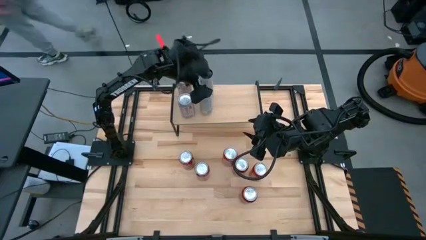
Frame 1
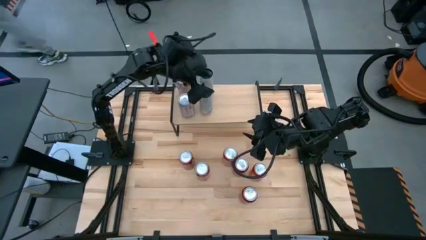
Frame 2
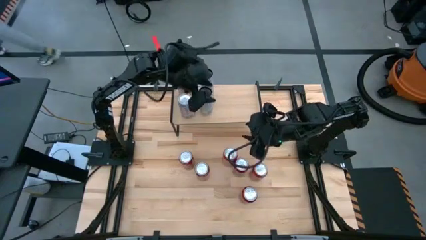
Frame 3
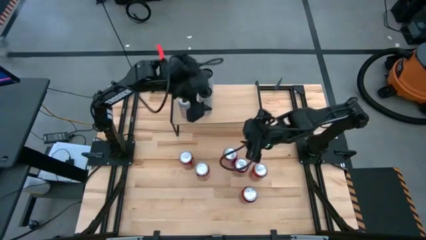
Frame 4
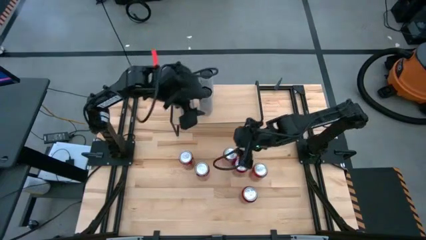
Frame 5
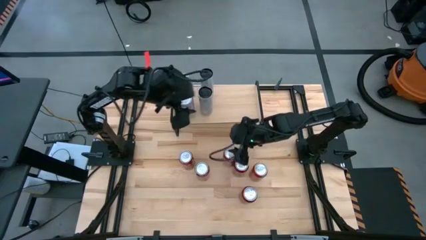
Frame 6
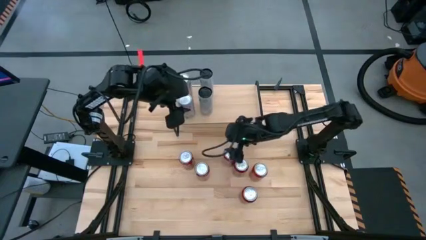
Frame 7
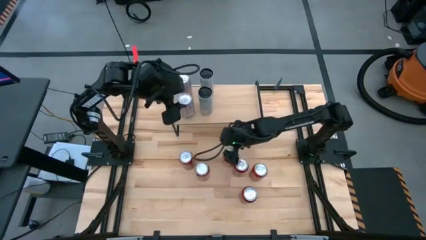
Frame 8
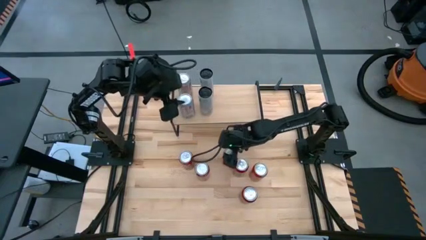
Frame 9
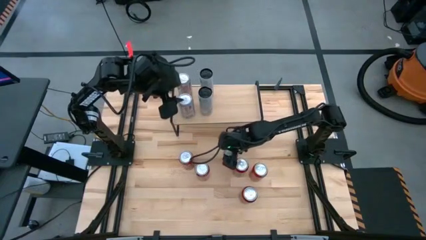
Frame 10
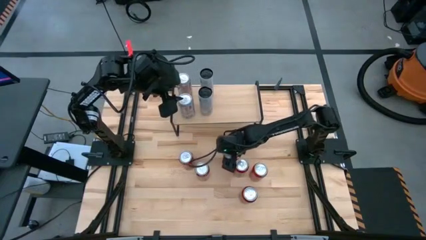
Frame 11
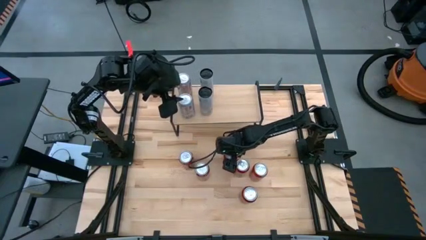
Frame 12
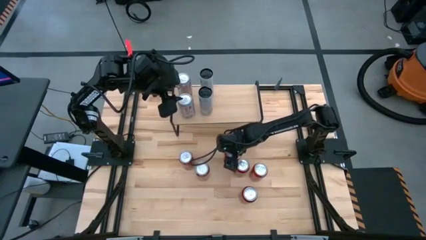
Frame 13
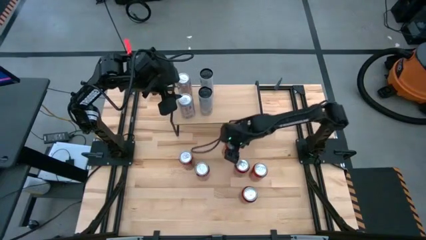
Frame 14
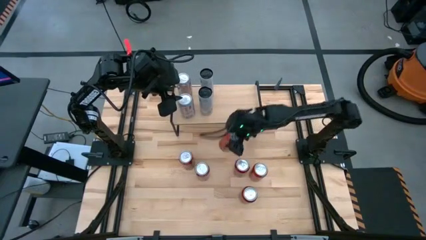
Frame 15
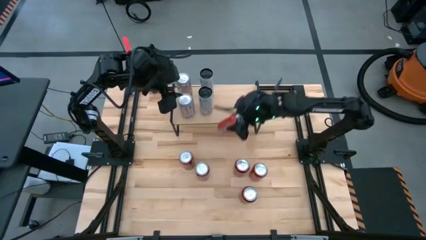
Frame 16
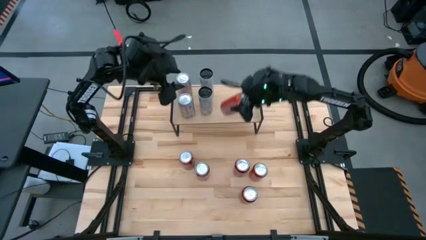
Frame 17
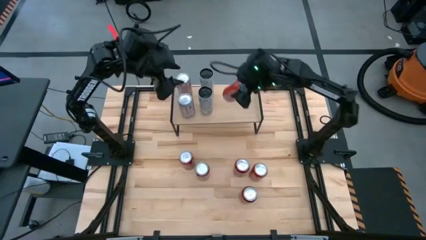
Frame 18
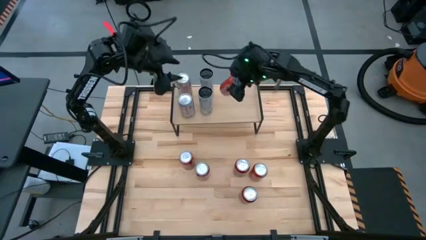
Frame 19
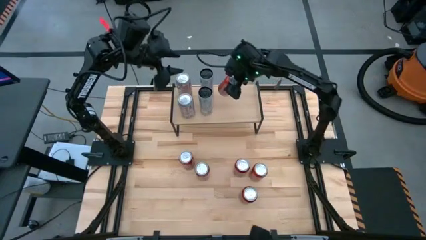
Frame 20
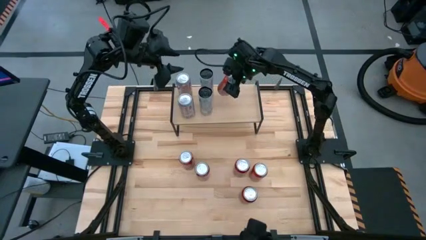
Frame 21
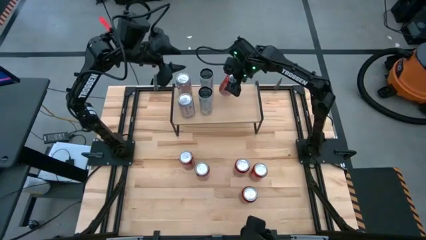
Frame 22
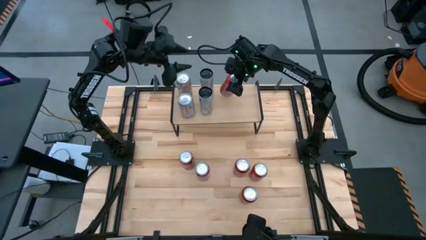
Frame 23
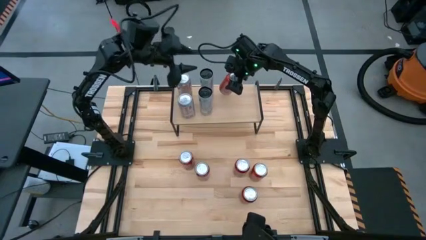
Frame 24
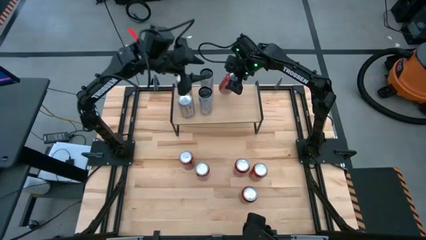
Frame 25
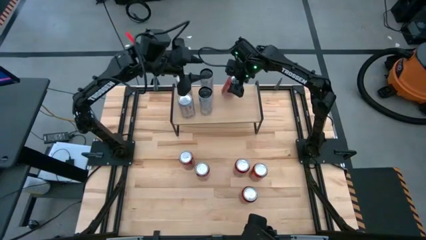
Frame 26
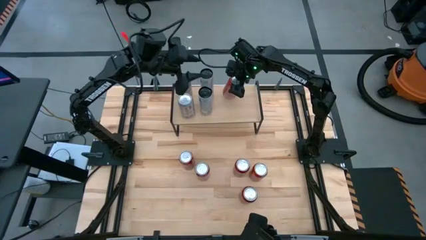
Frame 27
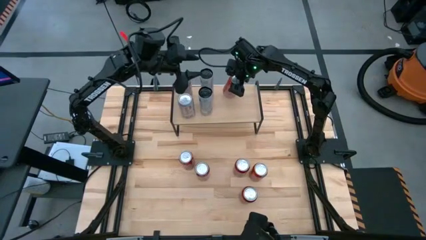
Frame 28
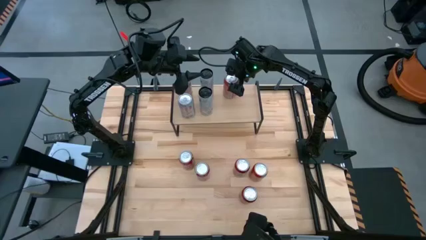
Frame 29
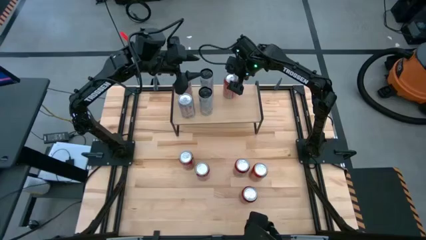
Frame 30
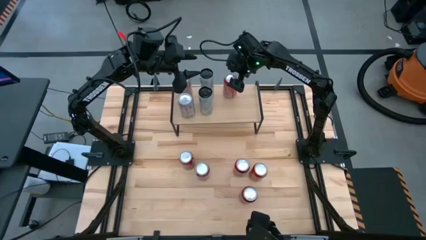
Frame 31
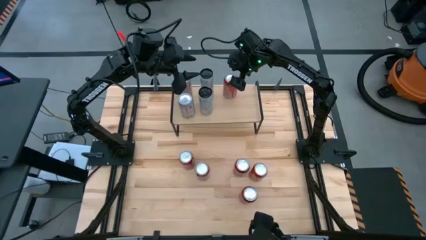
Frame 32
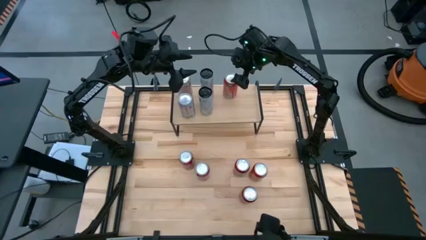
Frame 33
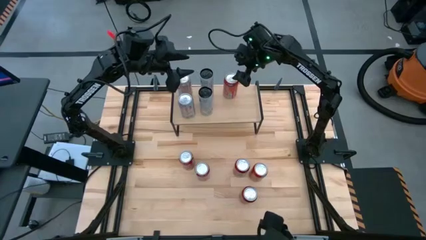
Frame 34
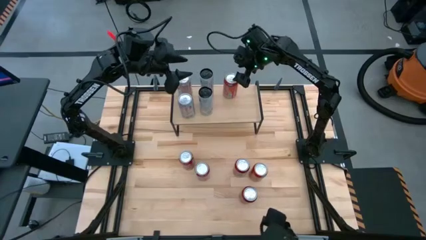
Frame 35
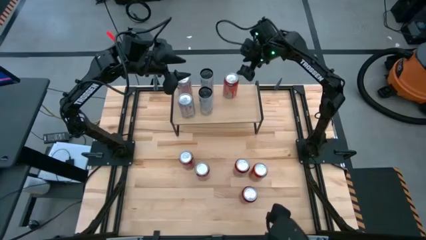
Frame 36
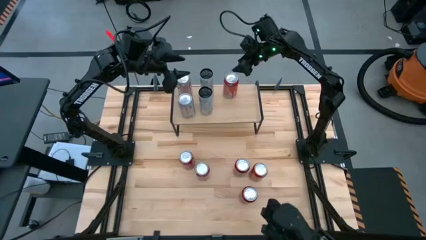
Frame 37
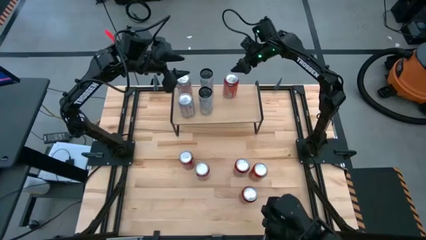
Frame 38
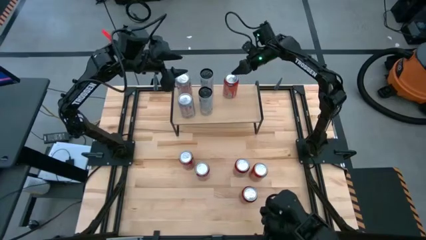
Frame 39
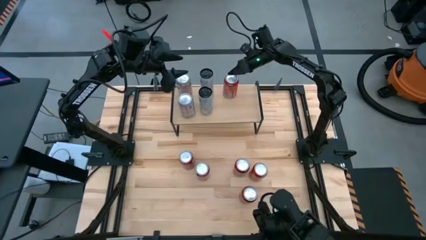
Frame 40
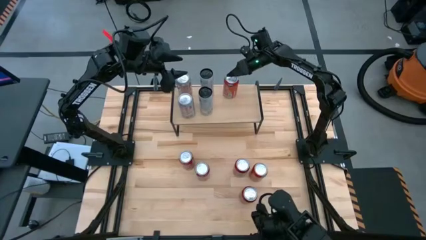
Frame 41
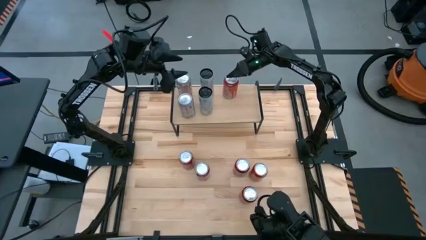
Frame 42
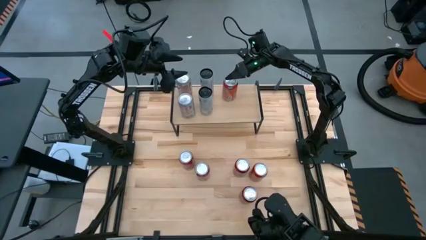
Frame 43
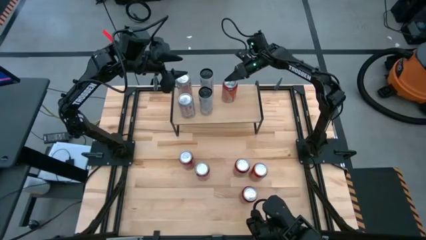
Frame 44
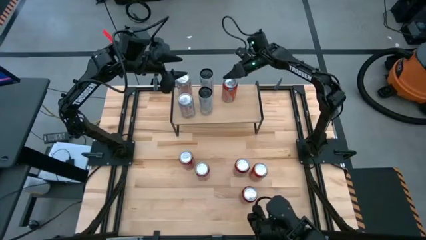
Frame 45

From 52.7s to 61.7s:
Task: Place canned beverage on shelf
Put the top red soda can on the shelf

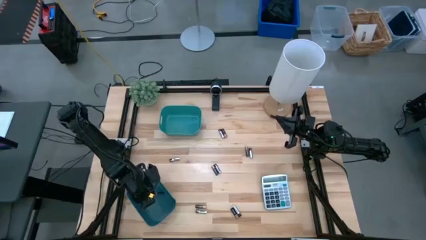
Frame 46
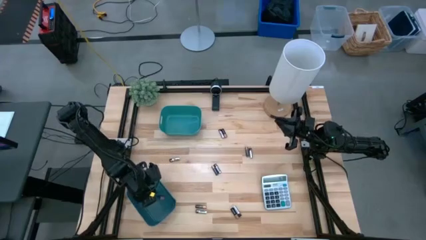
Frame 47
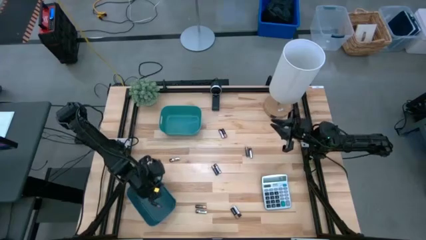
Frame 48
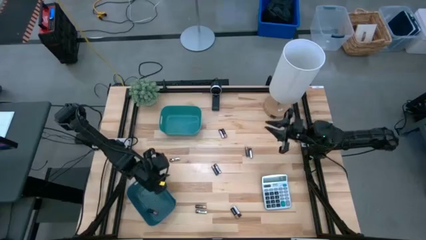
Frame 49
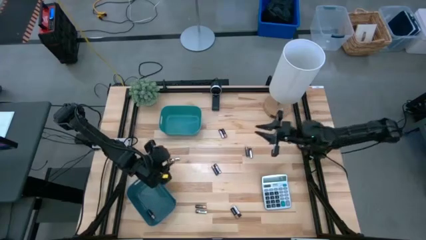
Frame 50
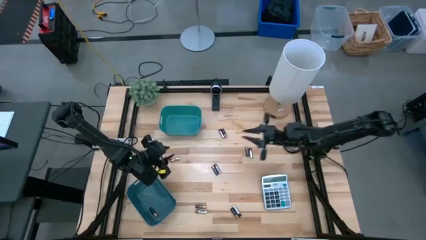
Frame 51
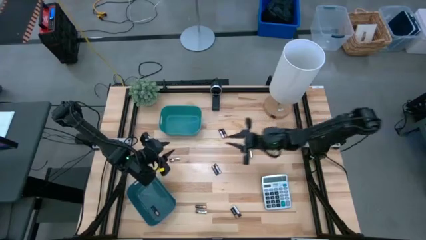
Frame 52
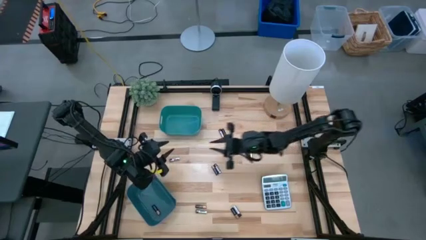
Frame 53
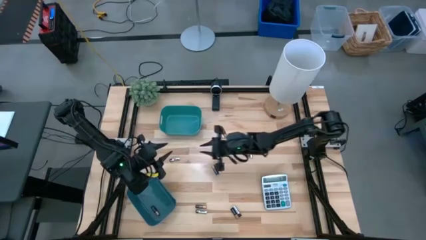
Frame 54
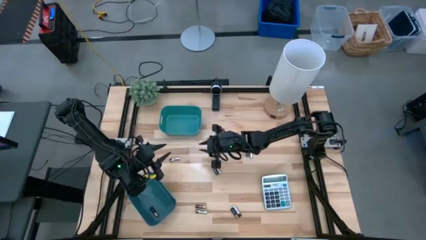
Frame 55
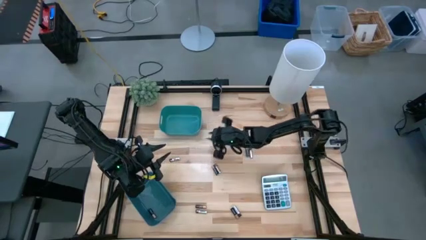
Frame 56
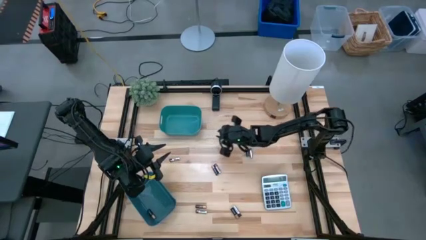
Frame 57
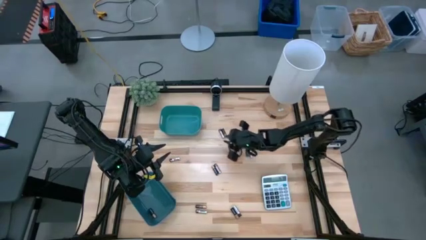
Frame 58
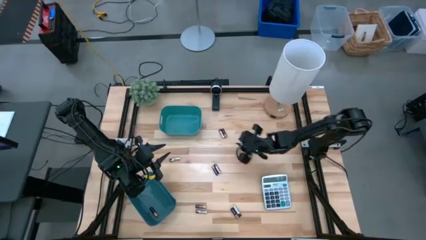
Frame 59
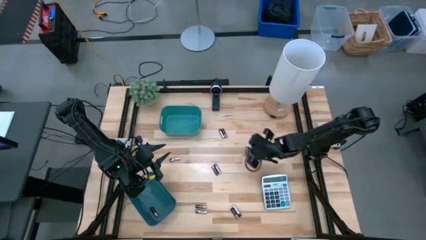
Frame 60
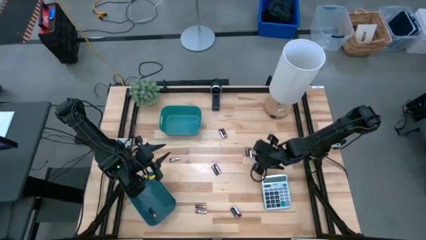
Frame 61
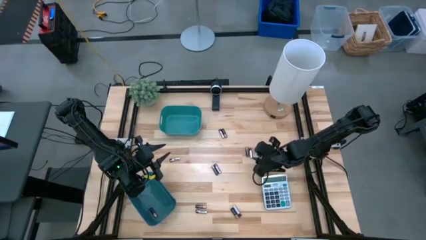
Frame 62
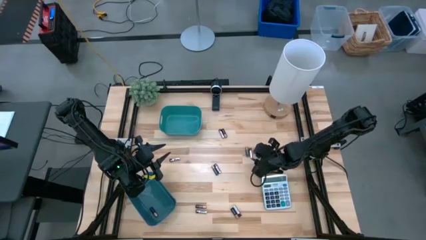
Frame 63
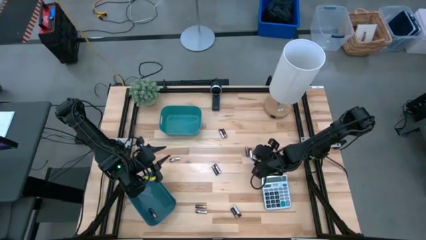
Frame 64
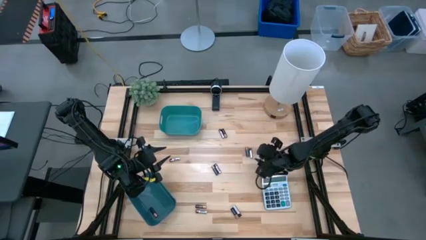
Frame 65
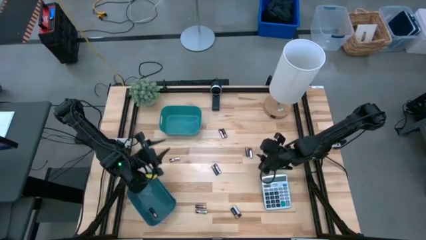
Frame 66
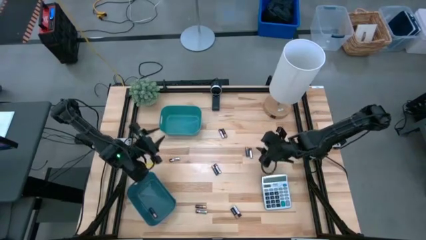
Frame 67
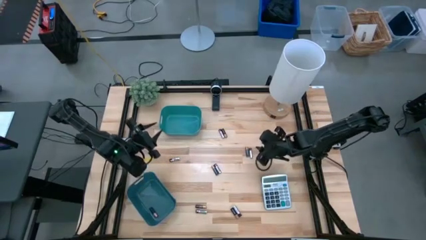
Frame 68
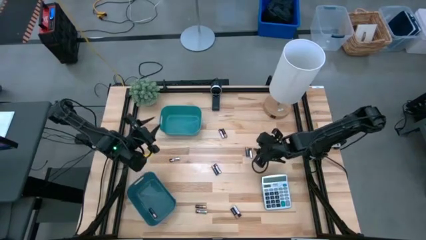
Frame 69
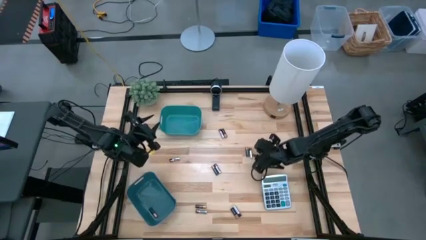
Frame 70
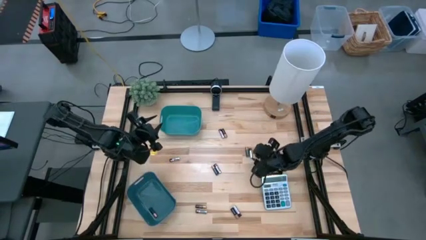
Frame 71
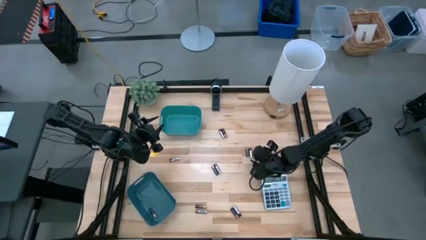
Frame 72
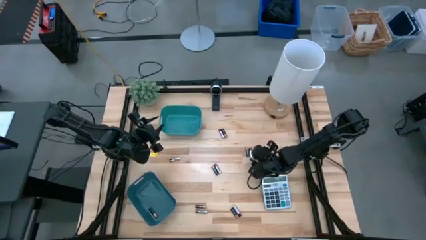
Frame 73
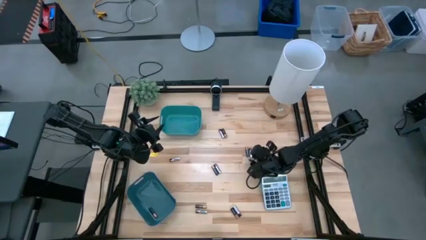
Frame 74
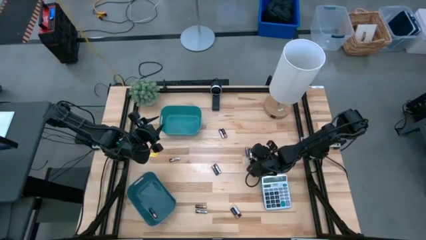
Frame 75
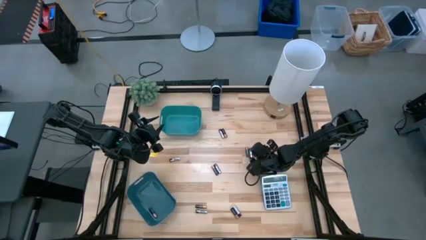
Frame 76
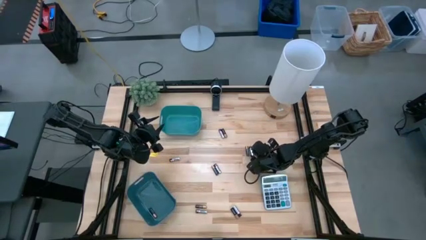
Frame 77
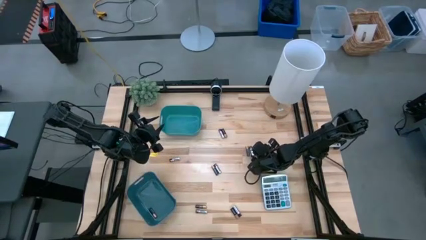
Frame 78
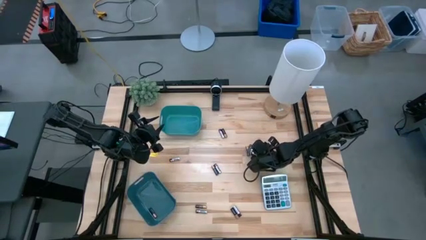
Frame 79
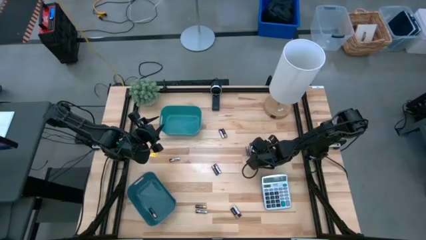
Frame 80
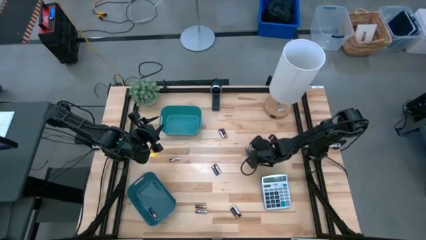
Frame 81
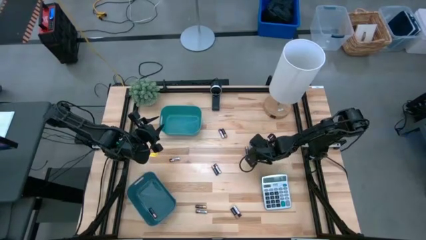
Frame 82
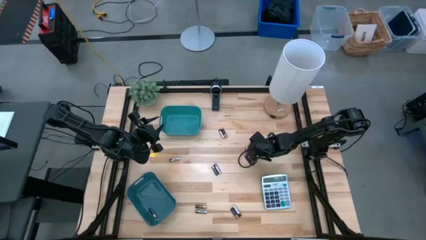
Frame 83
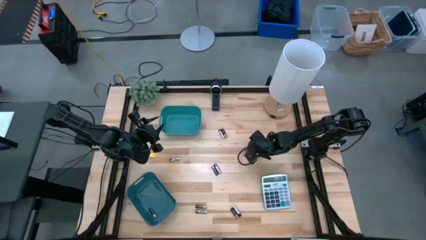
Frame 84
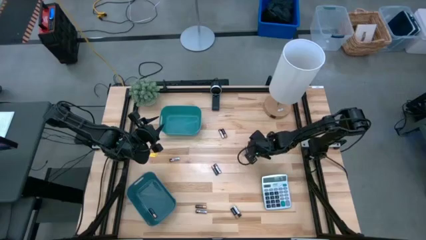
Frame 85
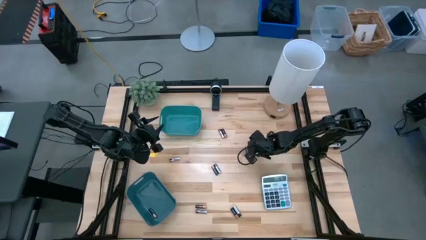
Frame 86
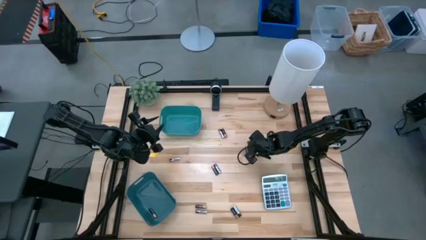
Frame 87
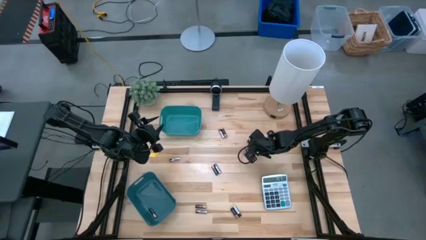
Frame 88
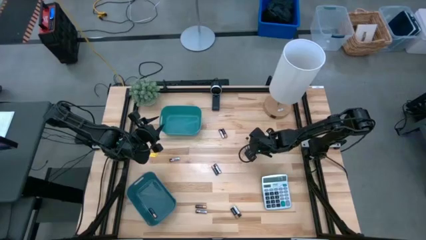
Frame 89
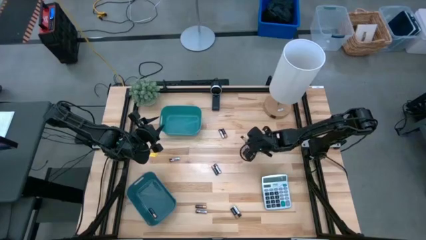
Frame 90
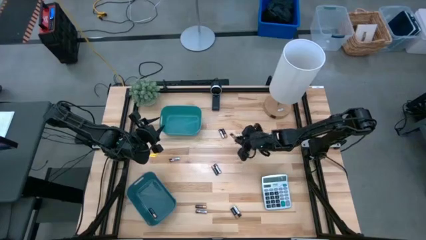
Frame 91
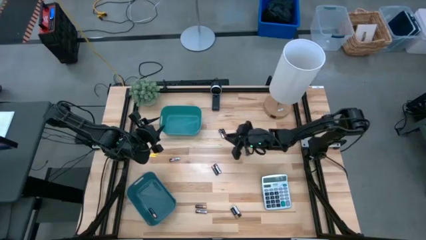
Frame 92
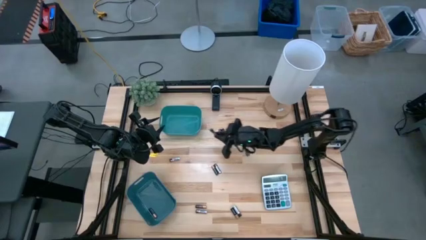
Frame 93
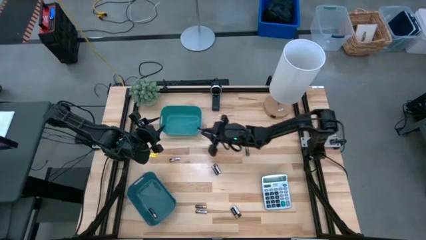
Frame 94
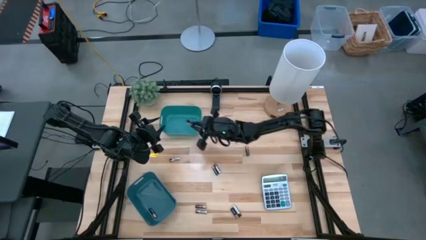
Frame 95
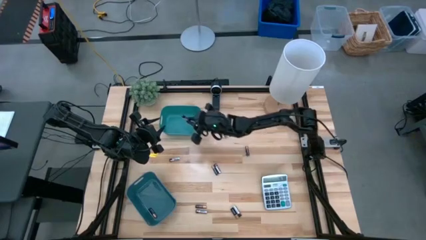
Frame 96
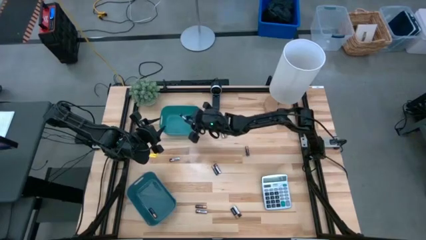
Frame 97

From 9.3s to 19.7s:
Task: Sort batteries
Put the silver battery into the green bin
